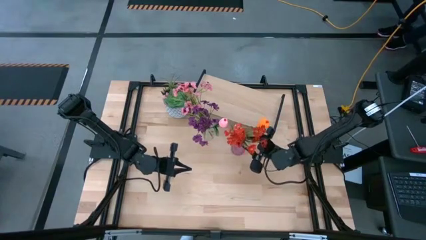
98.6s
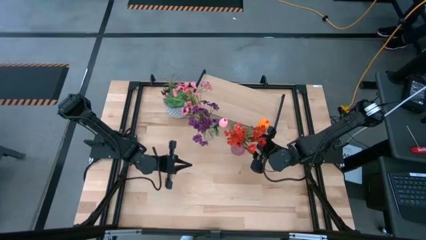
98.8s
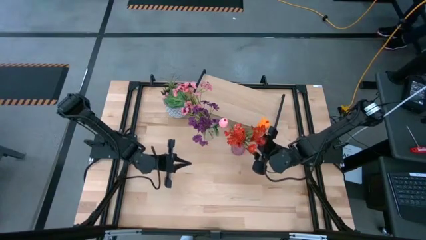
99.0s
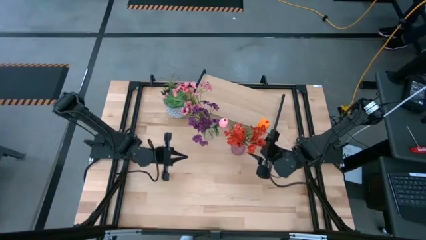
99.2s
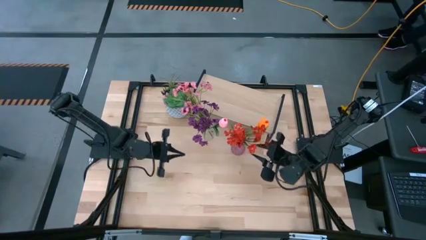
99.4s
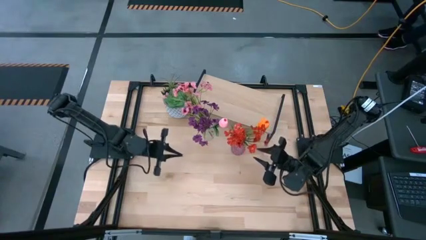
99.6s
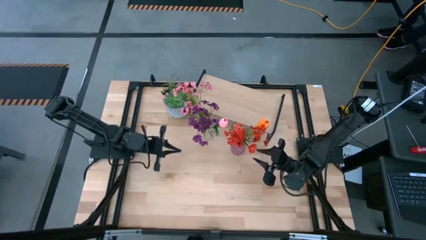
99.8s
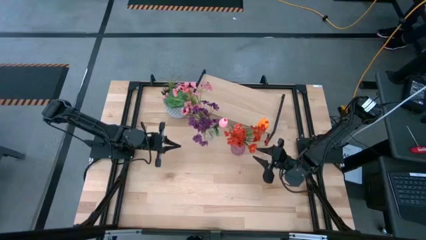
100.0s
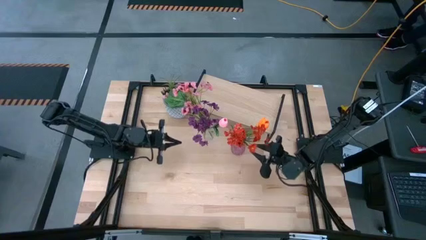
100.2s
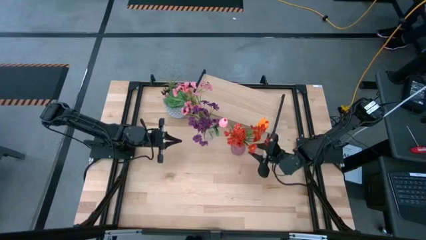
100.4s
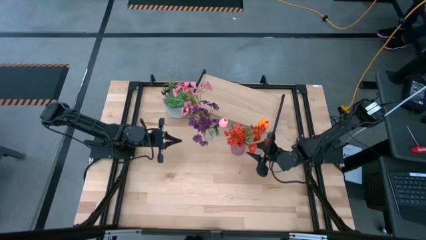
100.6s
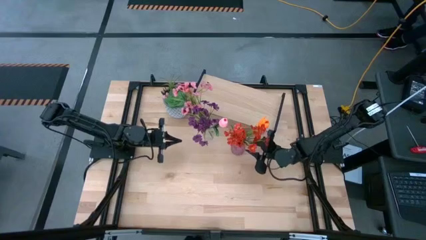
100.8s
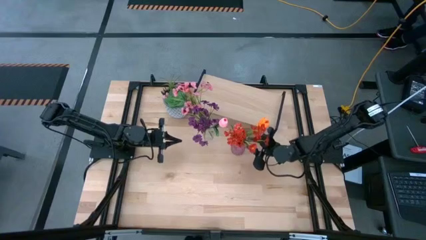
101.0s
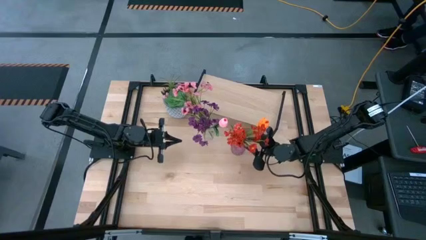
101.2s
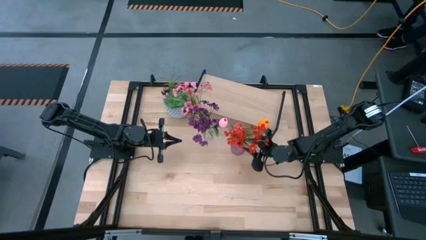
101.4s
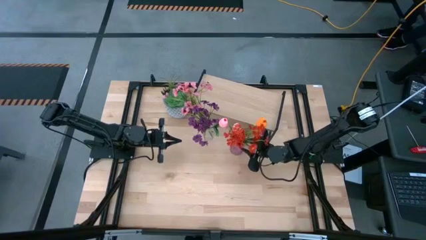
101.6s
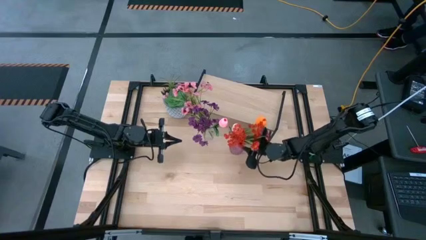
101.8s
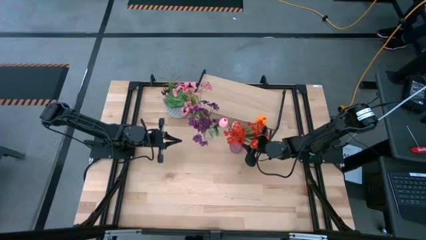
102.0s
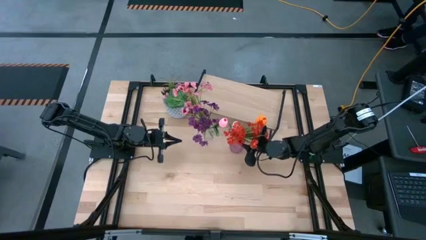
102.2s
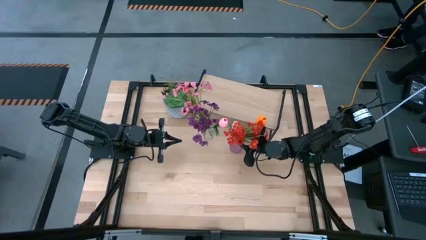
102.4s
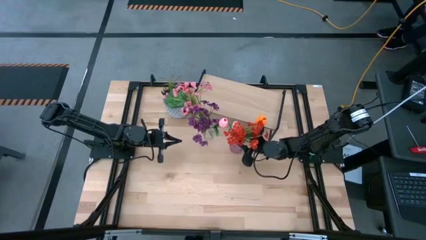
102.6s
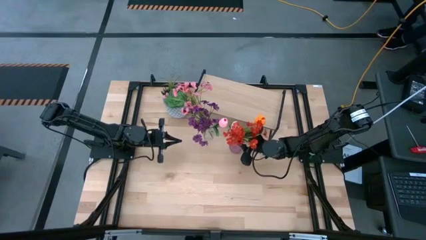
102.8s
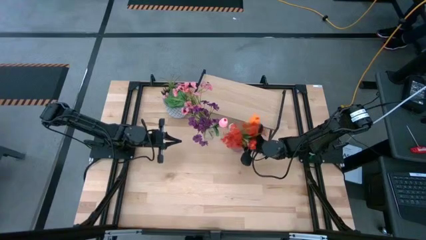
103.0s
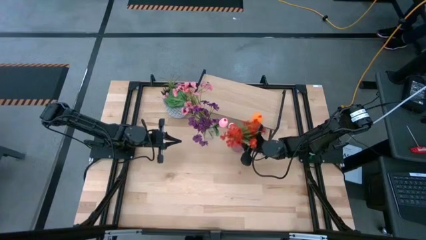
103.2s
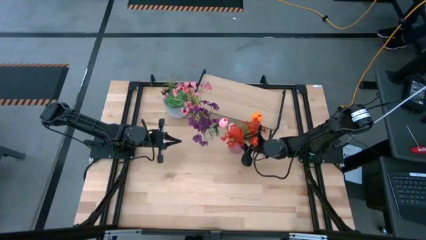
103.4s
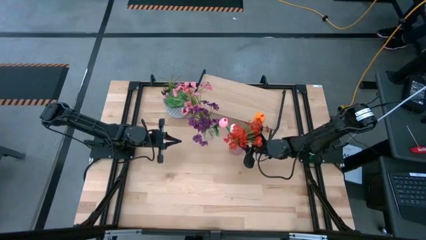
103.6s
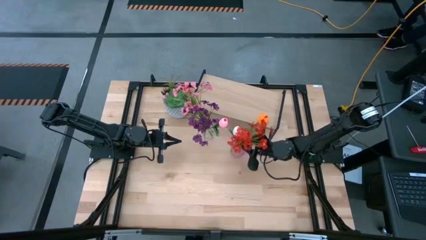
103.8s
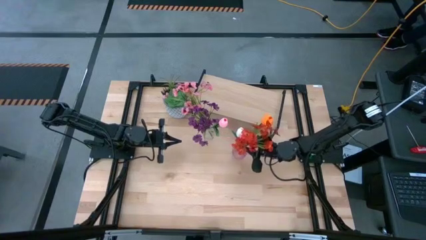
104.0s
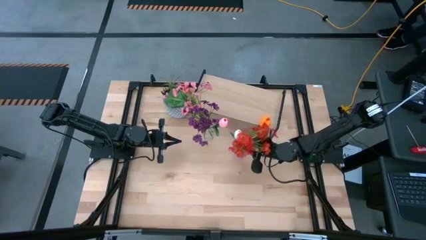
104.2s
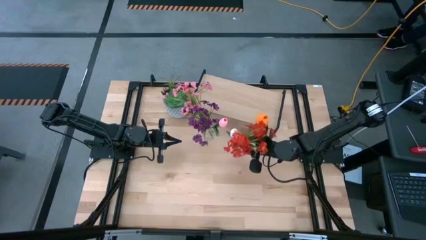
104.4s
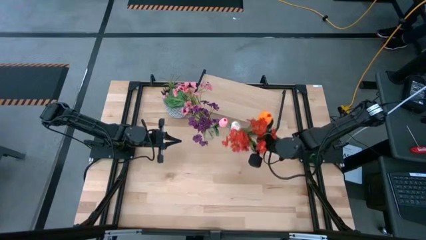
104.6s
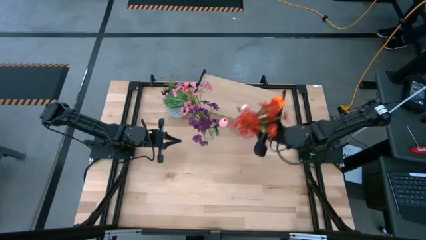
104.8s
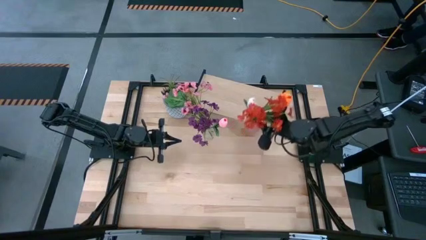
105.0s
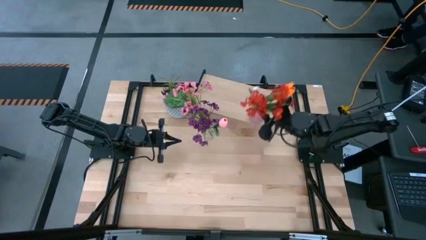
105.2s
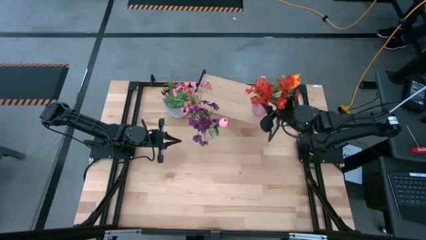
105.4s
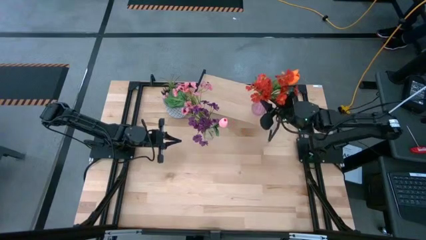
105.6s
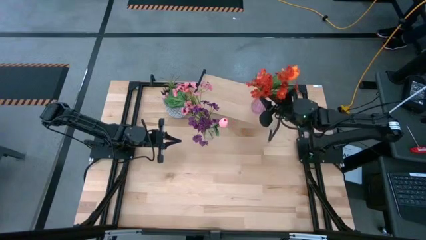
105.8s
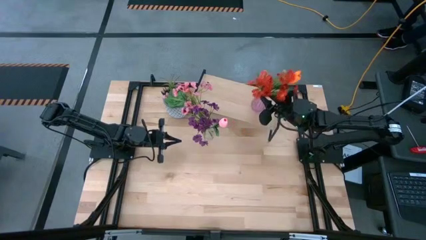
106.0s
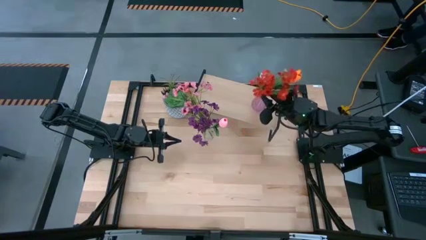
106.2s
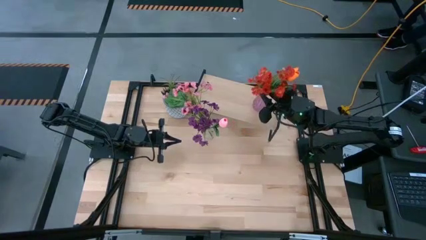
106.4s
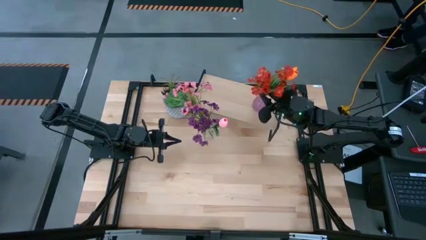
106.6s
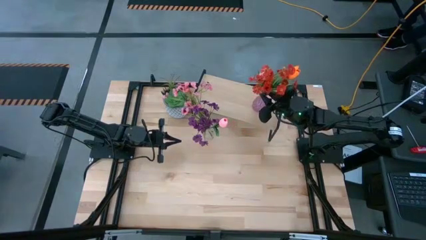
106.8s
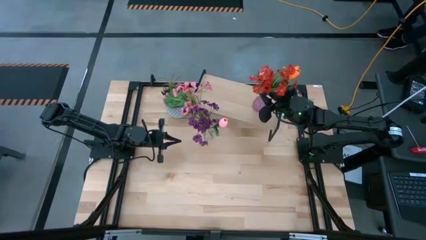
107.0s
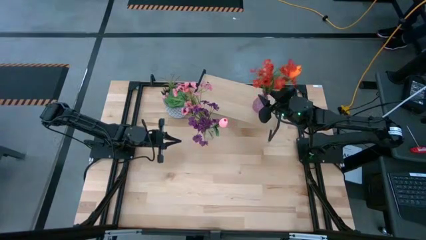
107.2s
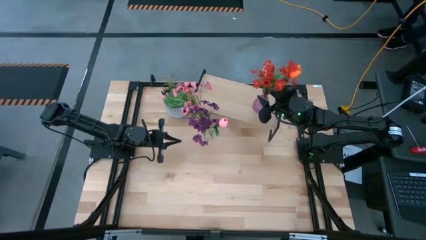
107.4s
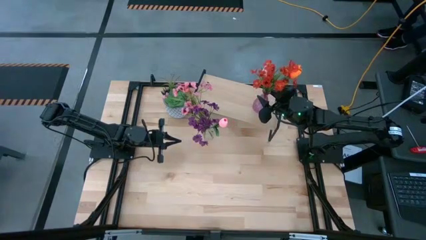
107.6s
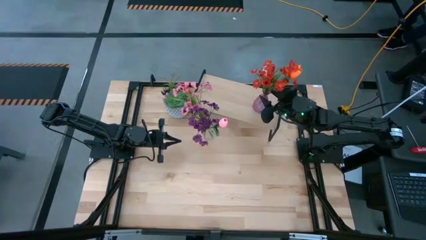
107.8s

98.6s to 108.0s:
Task: Pick and place flowers into a vace then onto a shelf
Put the purple vase on the shelf

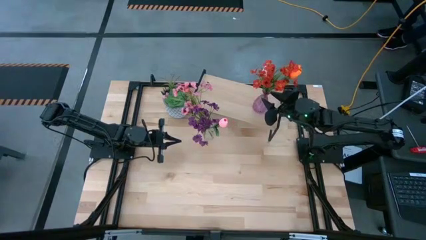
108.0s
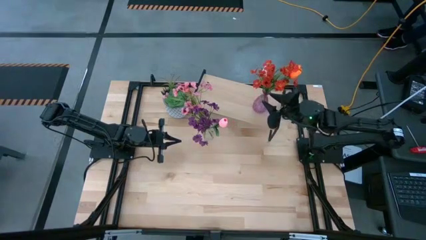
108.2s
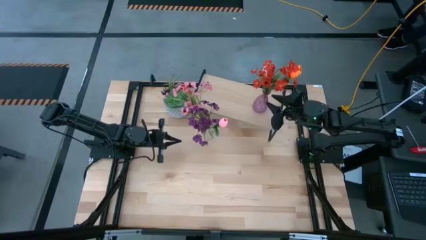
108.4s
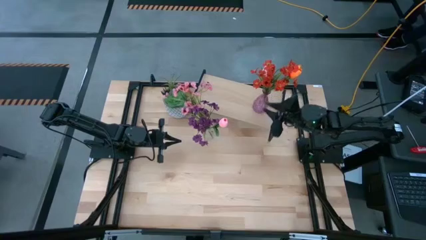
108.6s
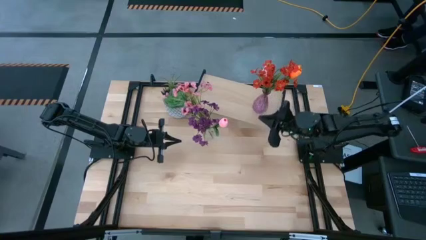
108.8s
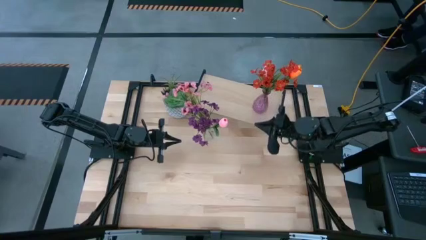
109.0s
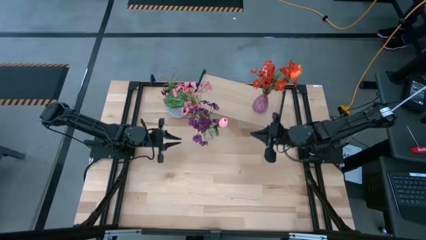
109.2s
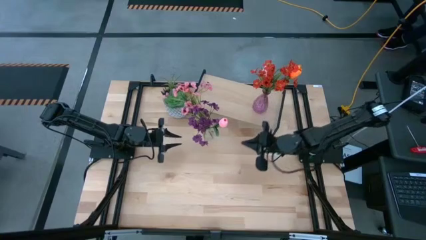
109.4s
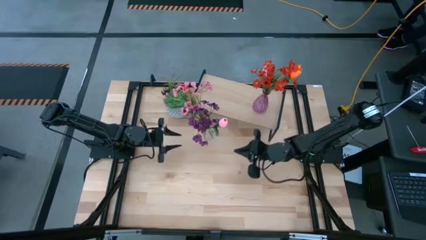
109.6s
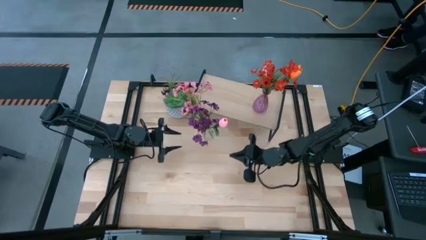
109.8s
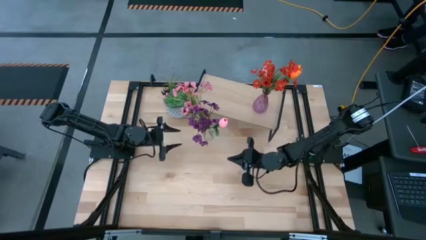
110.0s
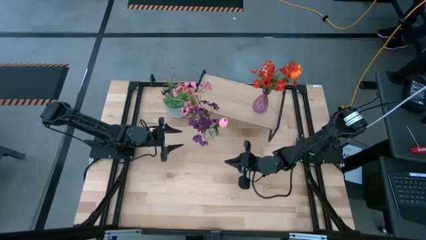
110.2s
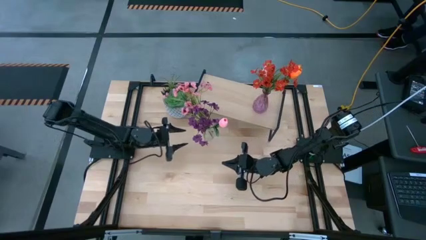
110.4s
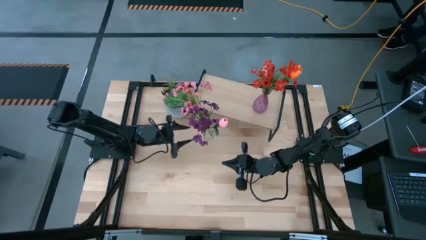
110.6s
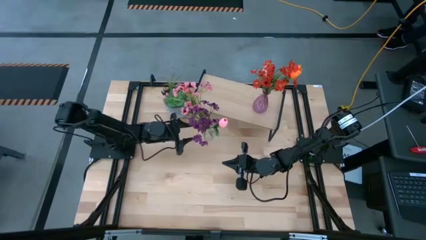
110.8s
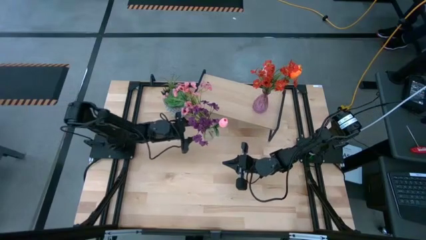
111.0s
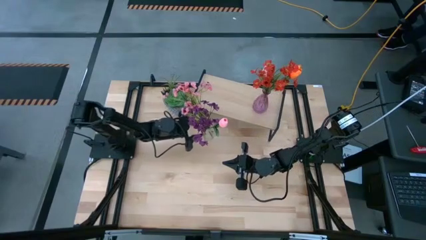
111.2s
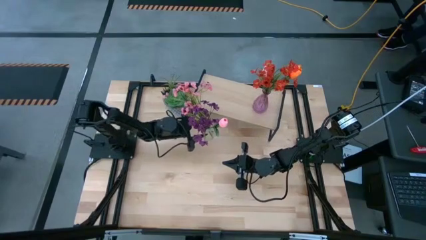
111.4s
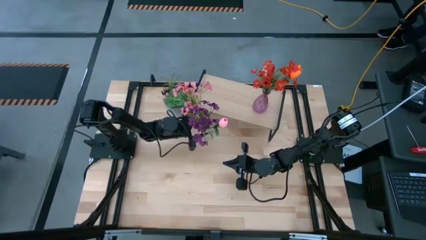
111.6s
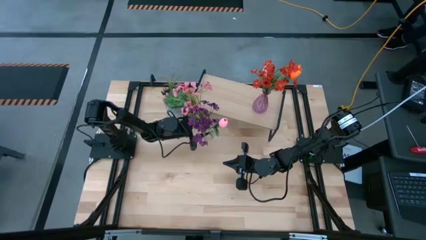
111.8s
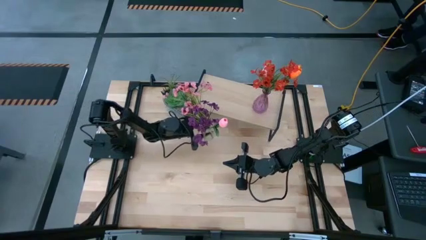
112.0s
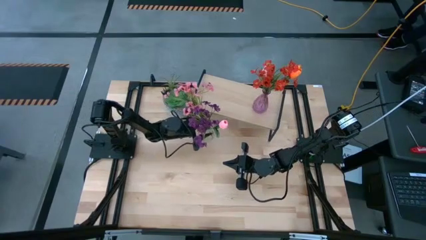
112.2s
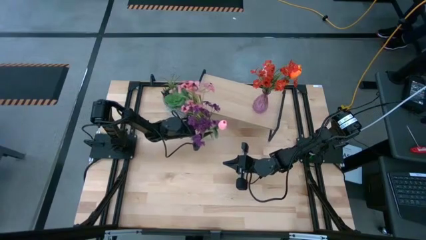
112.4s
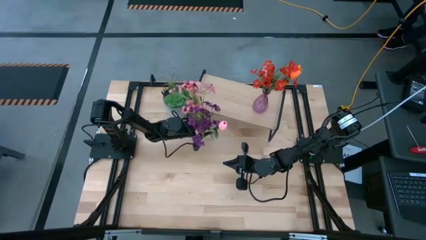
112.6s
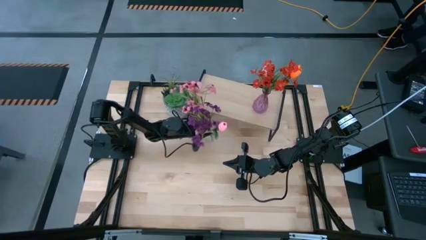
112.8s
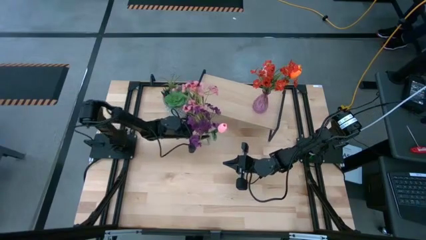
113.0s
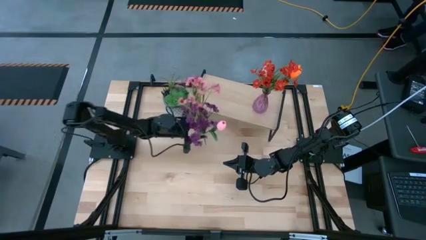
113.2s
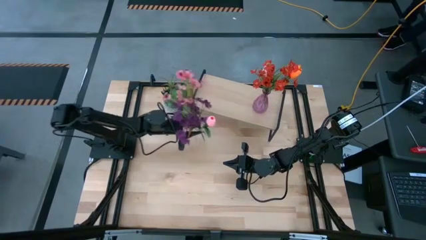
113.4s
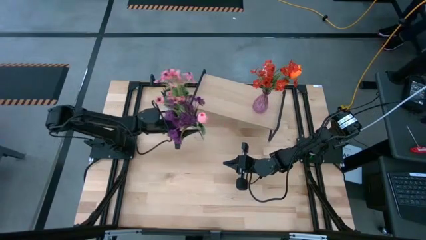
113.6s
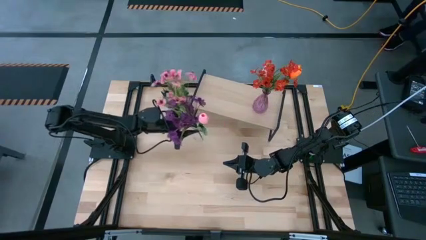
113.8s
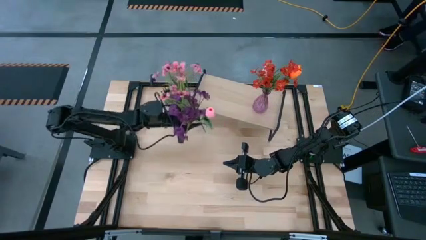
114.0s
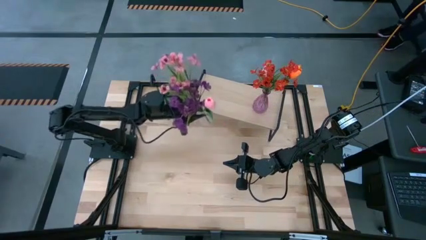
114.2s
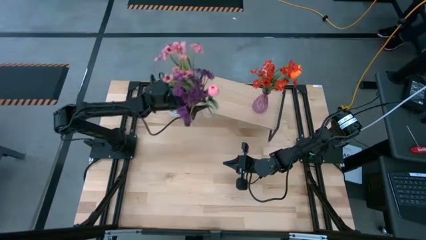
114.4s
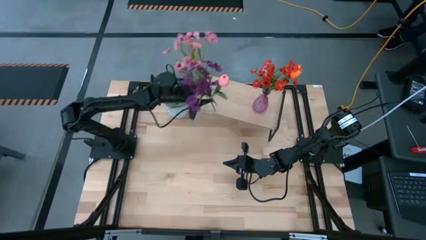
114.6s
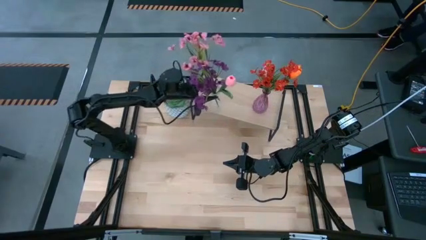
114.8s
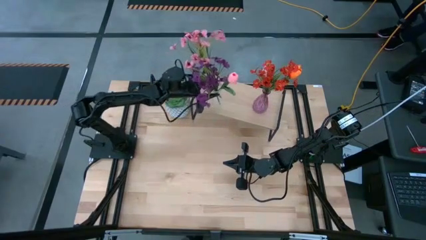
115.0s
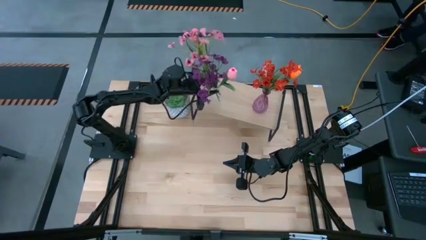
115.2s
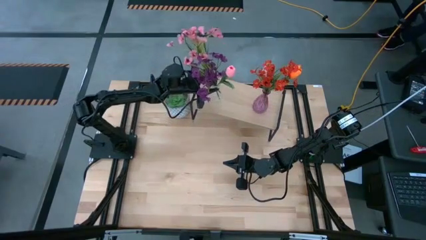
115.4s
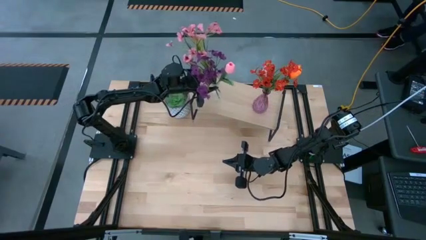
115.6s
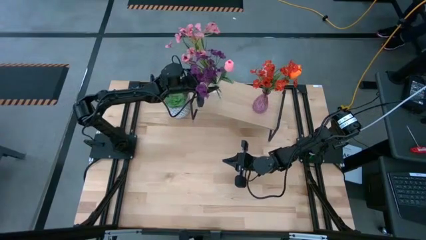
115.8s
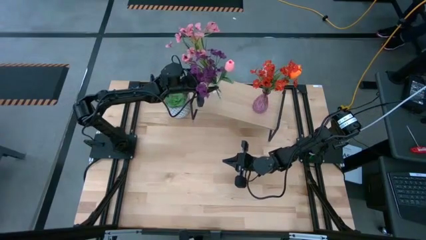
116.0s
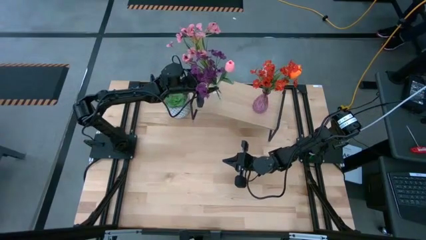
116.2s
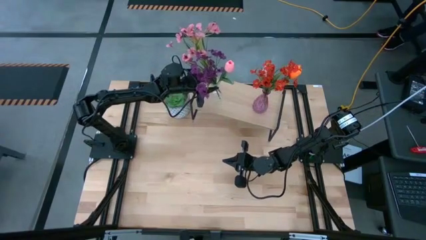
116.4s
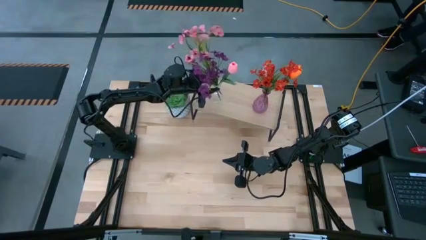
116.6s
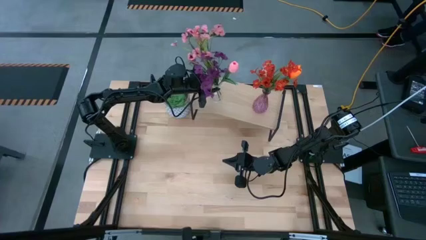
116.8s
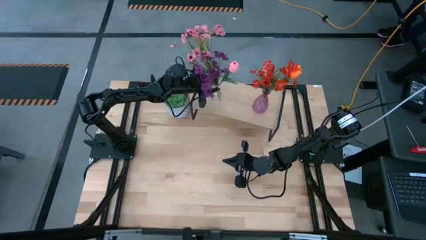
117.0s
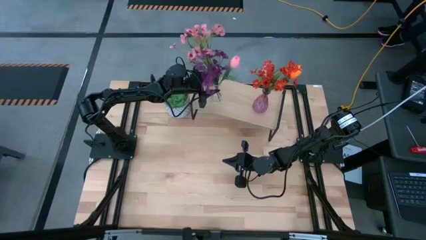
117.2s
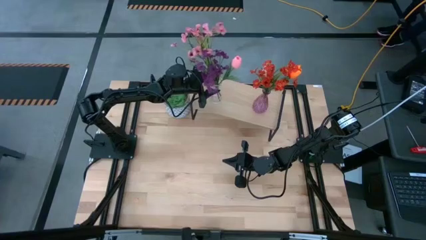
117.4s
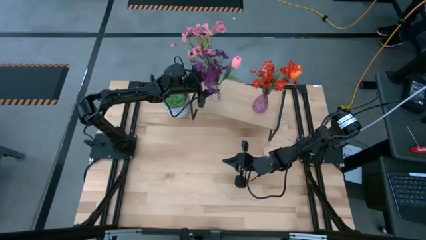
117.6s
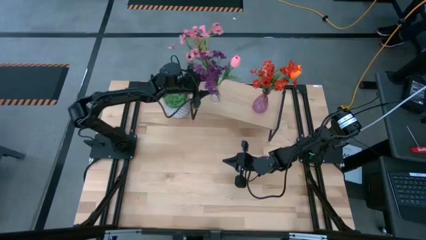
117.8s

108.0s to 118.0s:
Put the transparent vase on the shelf
